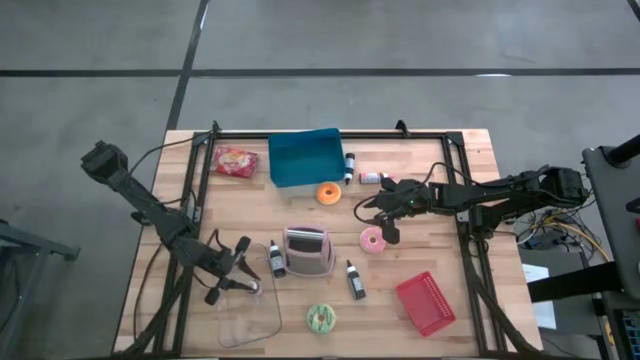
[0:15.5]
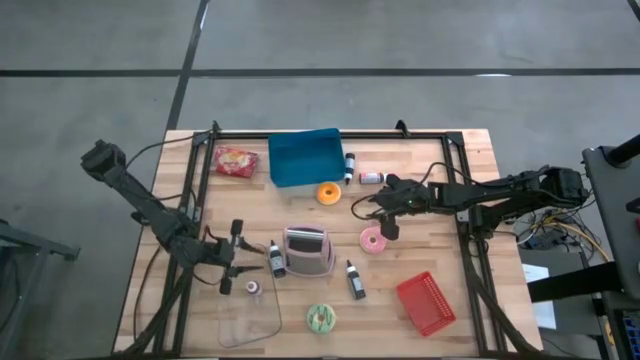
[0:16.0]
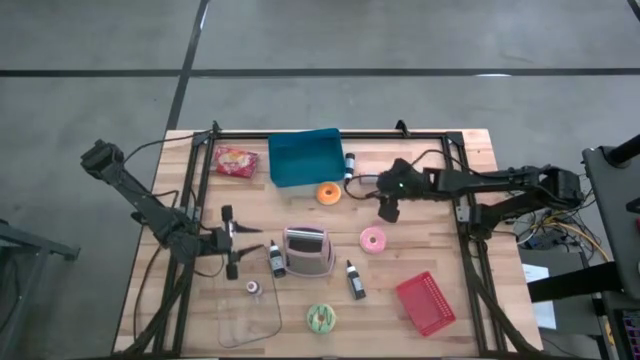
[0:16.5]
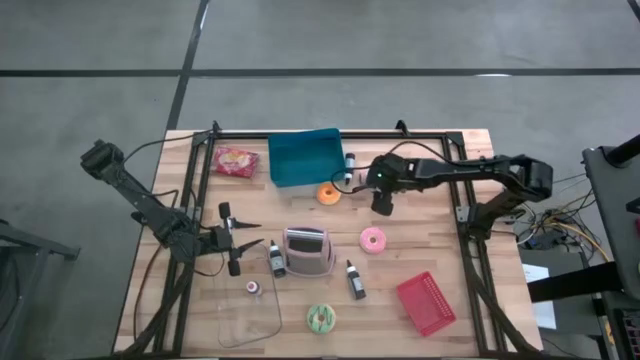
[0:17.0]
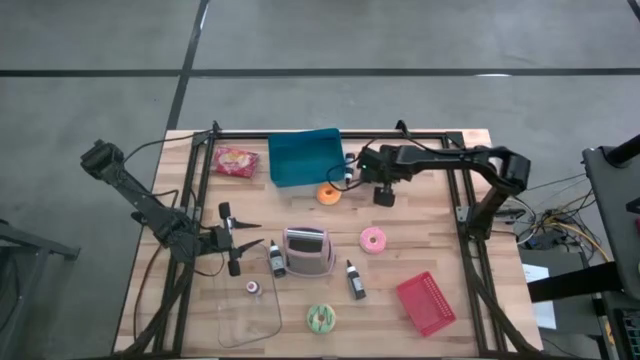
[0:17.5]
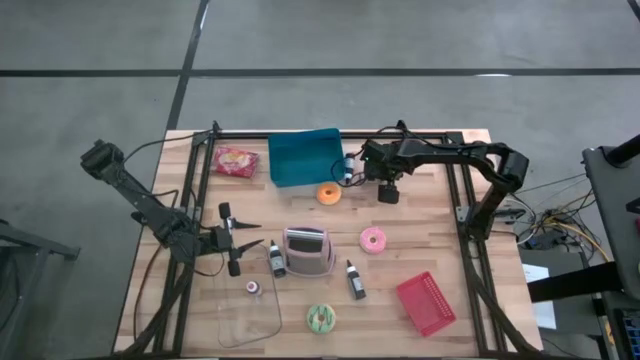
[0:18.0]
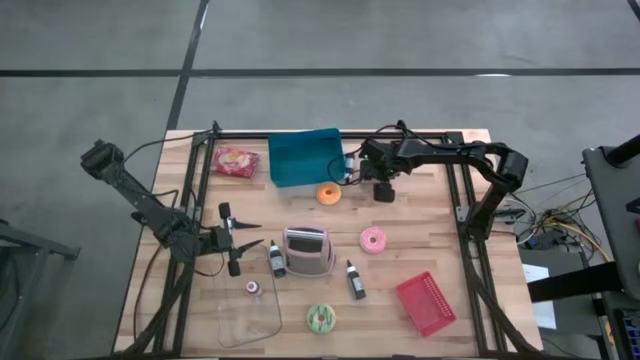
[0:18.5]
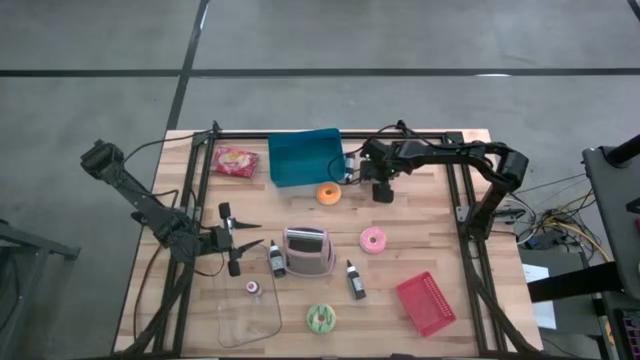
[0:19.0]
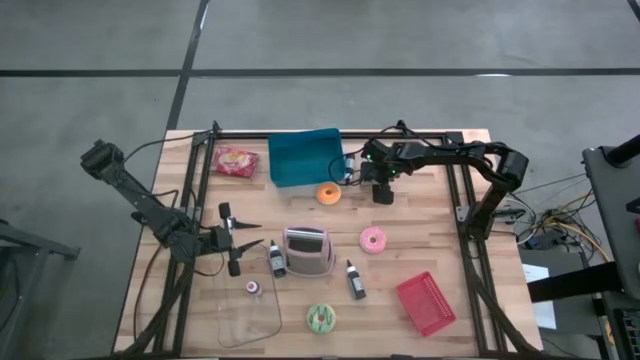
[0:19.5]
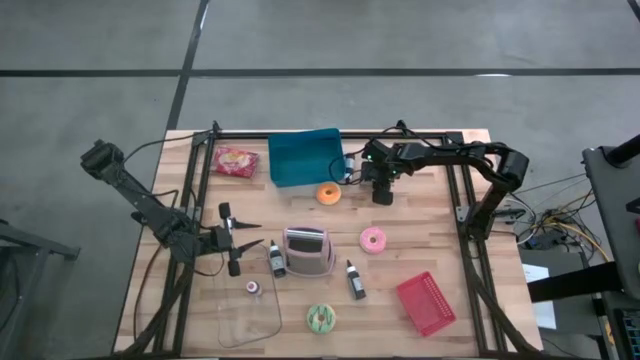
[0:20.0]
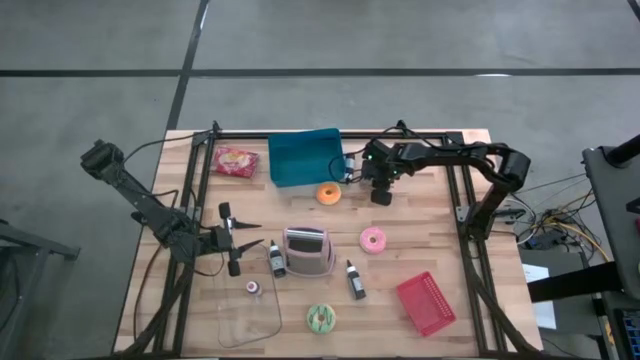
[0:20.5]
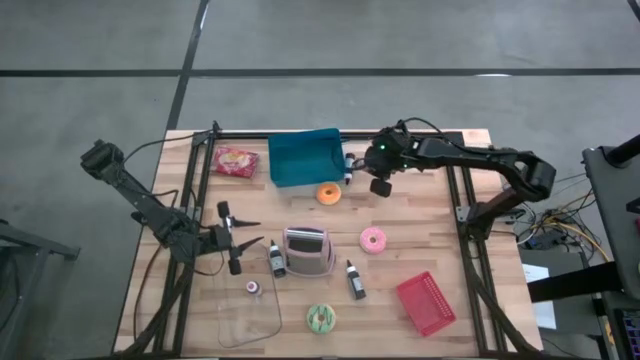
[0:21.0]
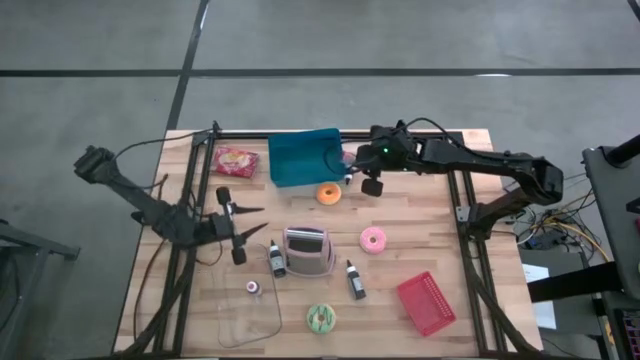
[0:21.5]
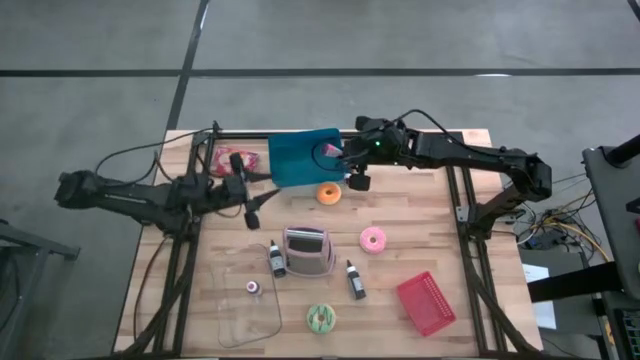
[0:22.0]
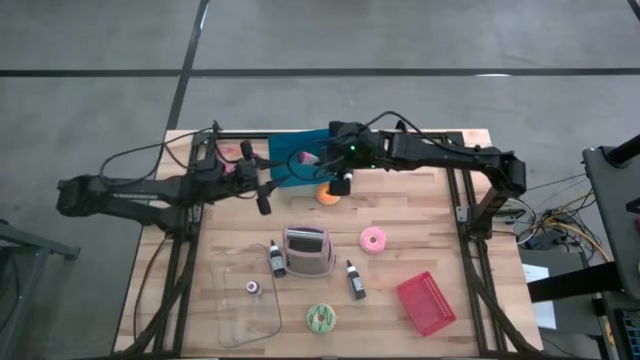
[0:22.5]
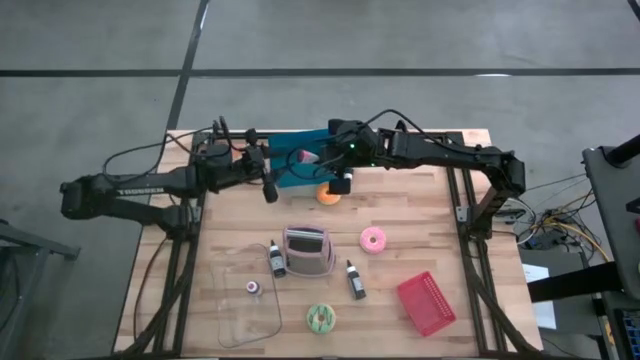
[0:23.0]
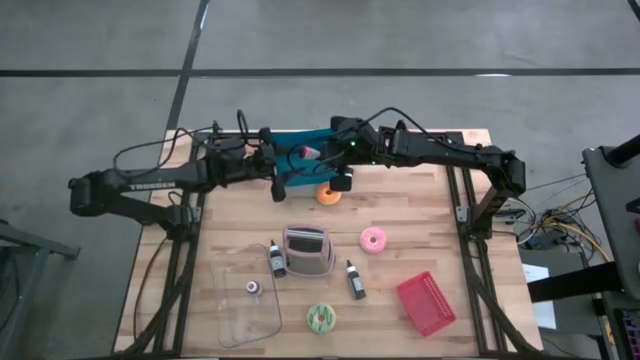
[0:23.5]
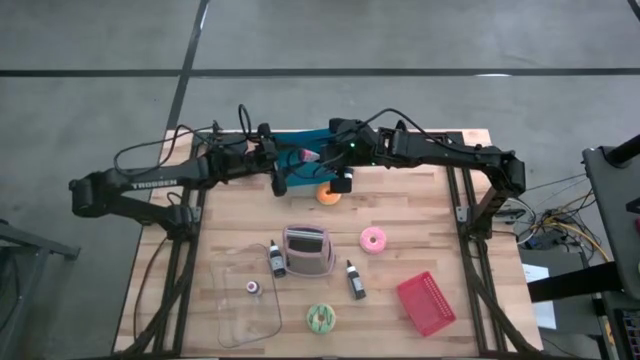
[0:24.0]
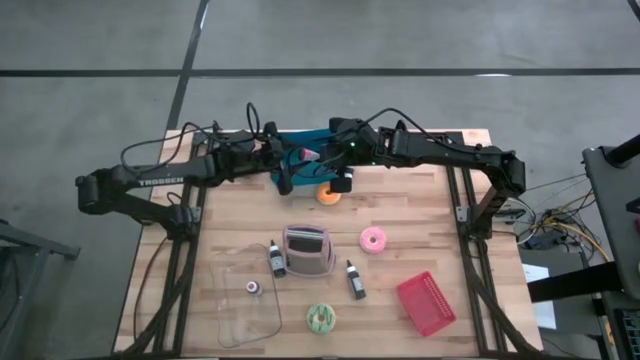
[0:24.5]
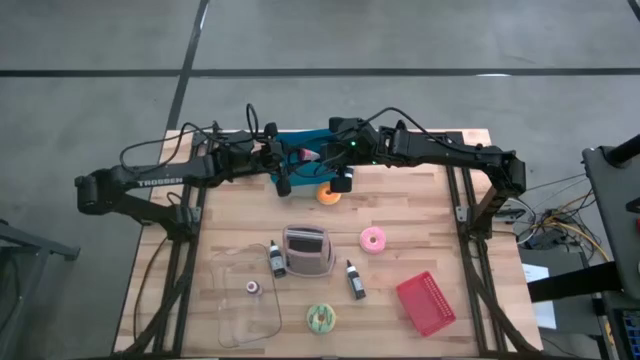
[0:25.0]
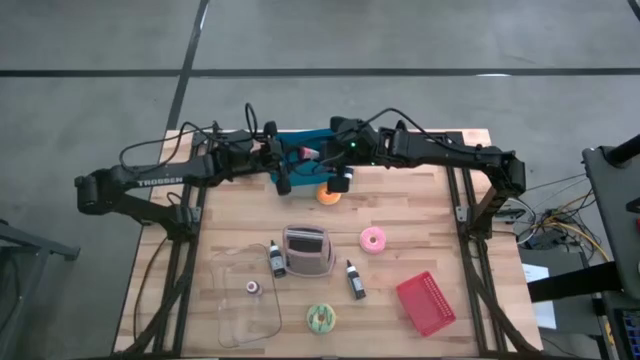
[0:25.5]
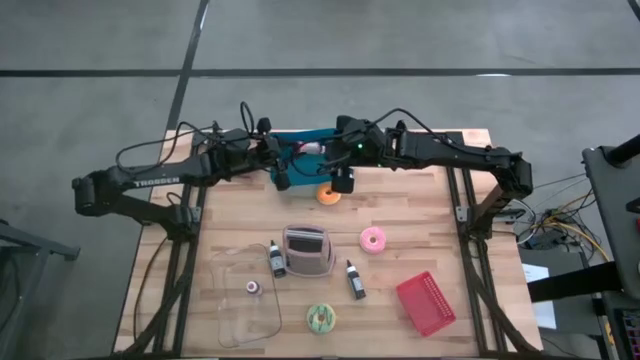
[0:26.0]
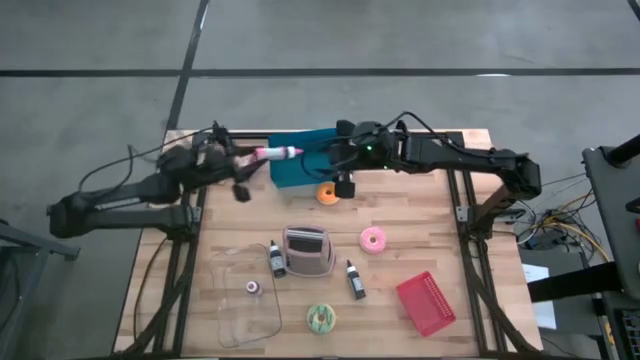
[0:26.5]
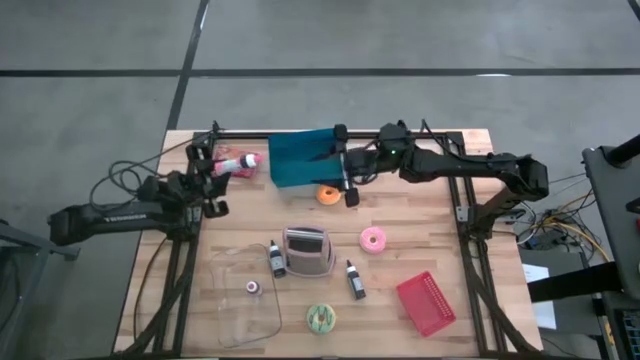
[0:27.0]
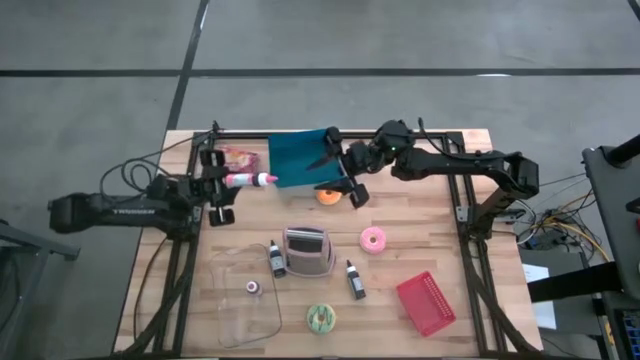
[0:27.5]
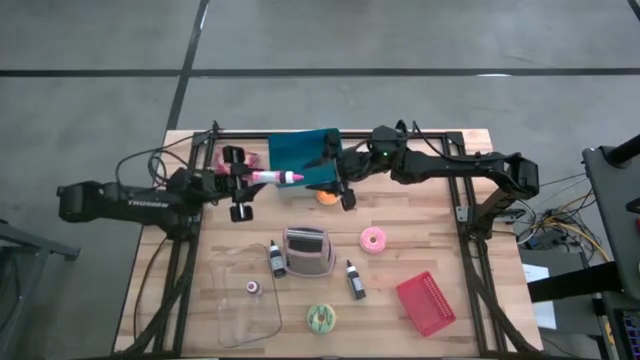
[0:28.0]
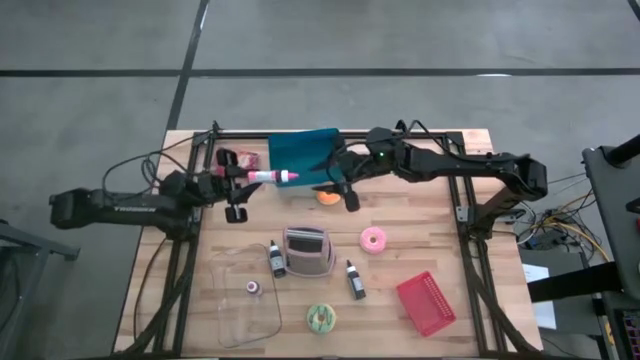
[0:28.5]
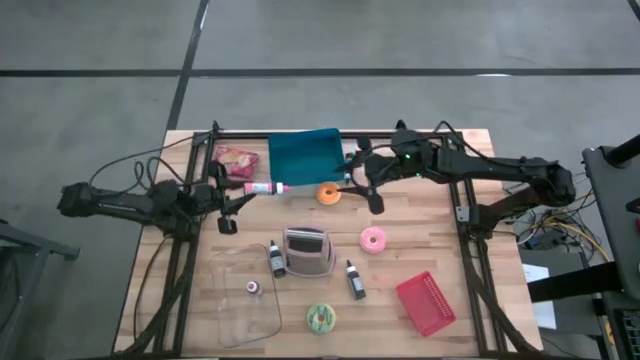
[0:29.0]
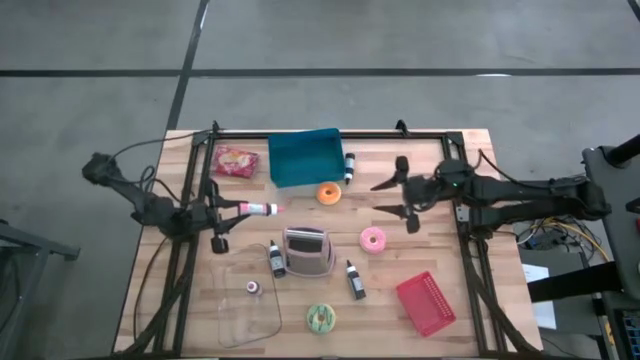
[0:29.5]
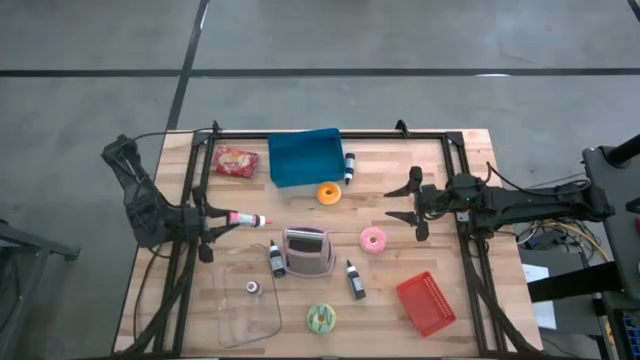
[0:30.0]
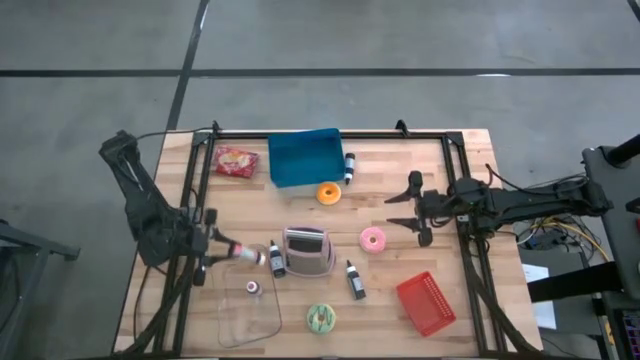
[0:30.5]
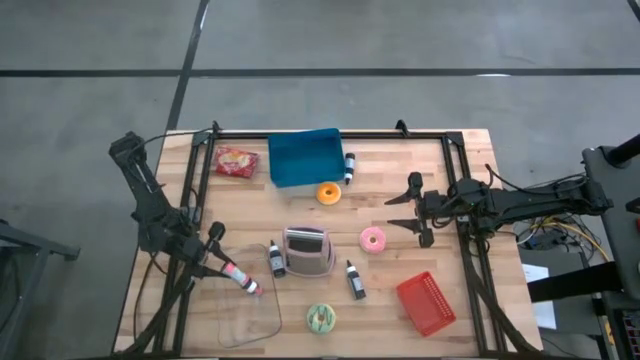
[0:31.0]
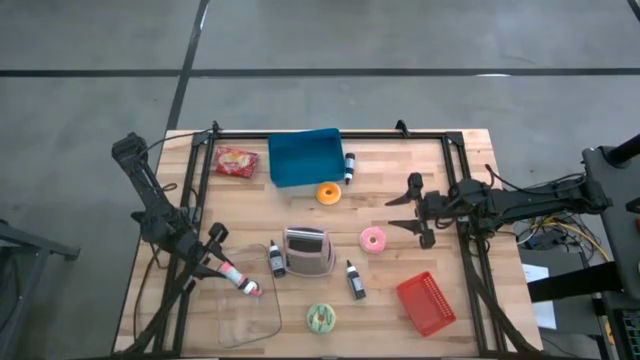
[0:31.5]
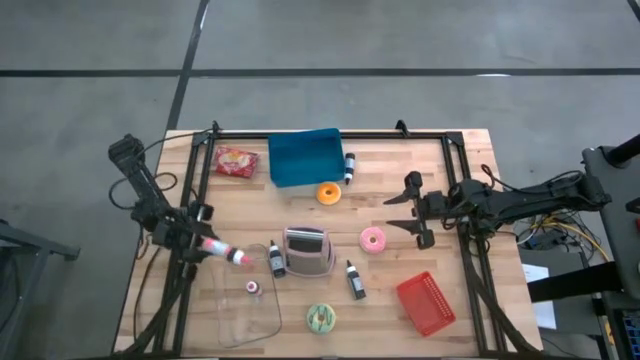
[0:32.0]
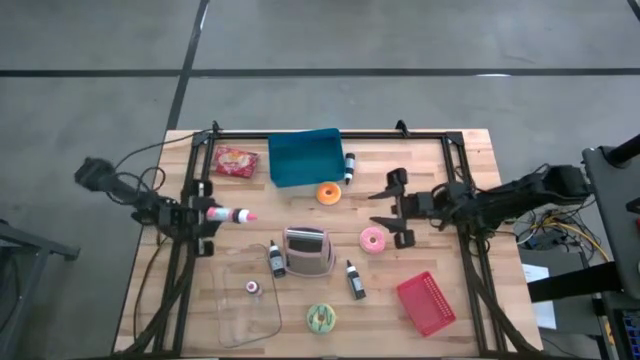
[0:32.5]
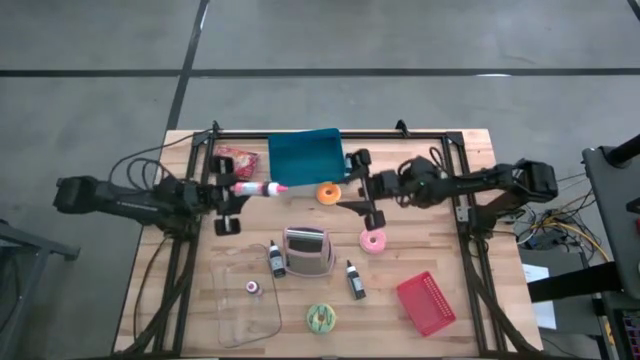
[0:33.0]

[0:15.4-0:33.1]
Task: Pick & Place Food Item
Put the pink food coloring bottle into the transparent bin

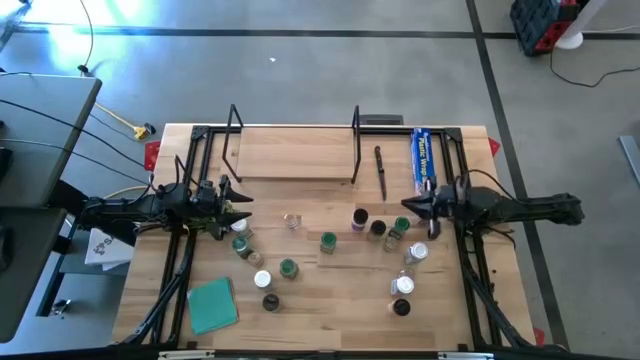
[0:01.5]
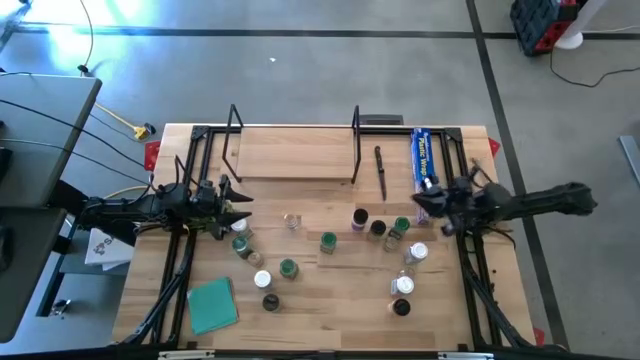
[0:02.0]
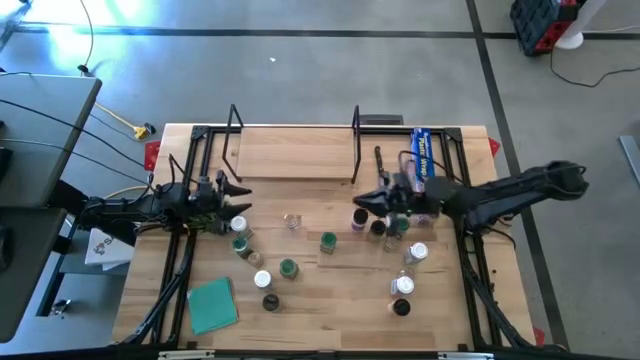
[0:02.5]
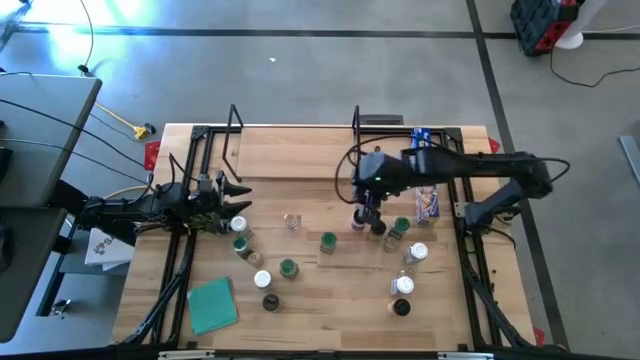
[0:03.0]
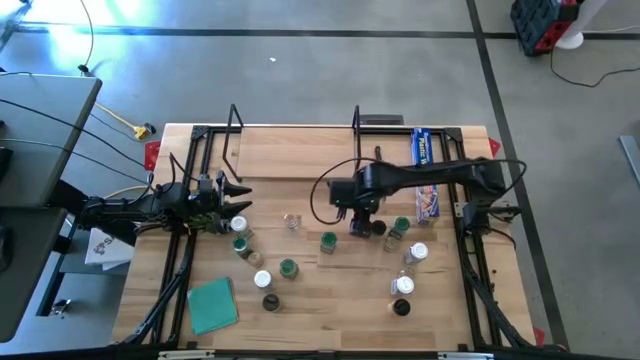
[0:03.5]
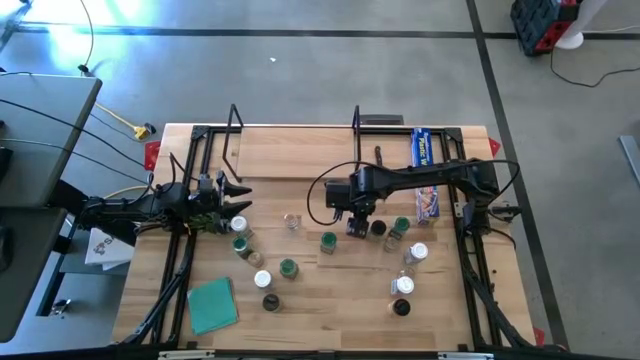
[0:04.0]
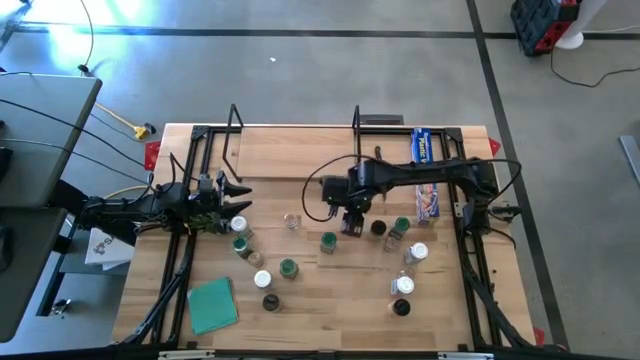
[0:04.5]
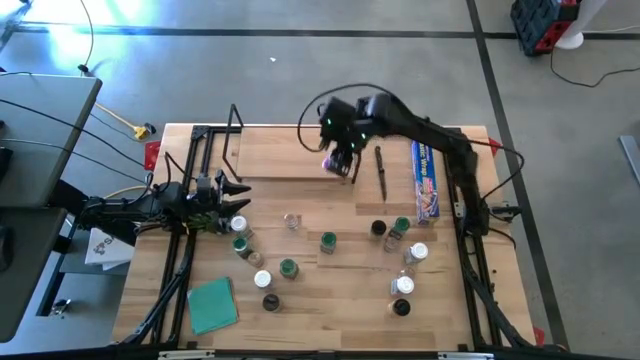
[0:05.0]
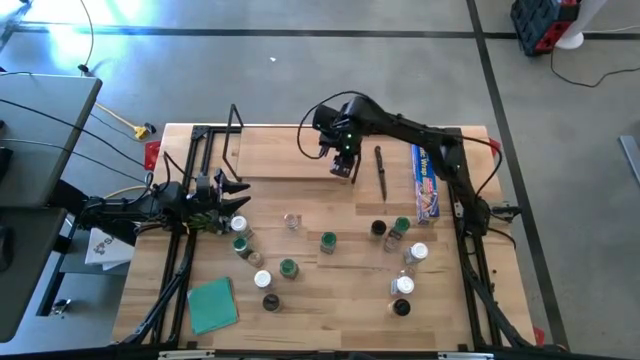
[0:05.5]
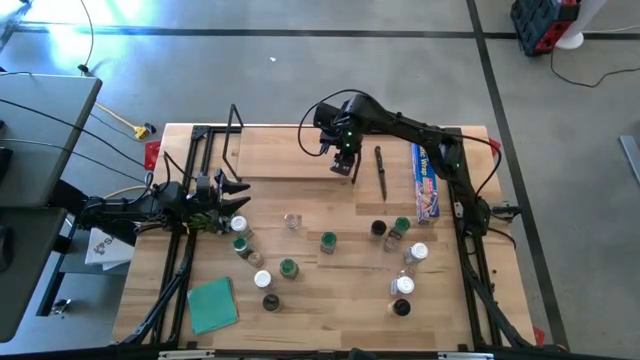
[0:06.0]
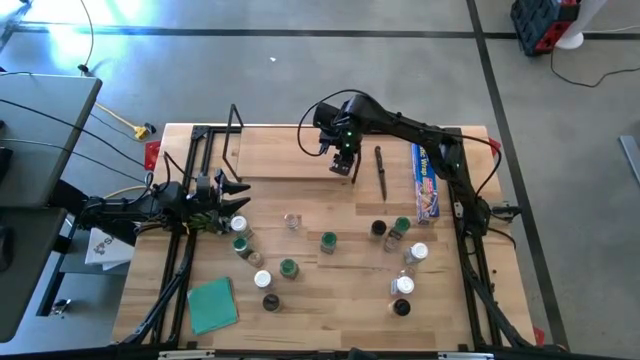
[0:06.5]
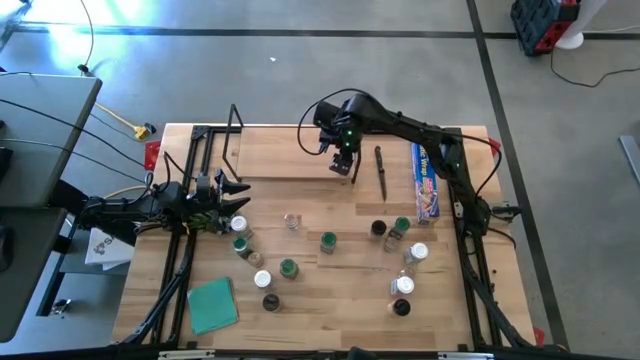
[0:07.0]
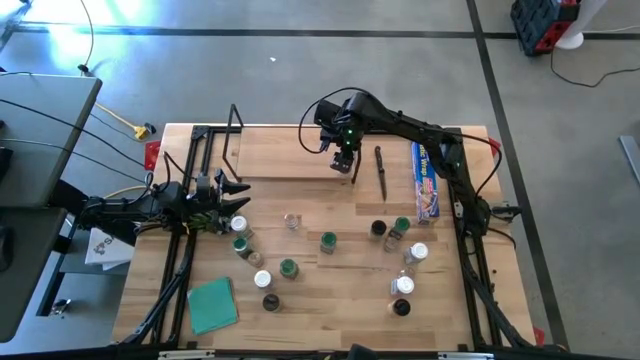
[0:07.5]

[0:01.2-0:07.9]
Task: Shelf spices
Put the black seasoning bottle on the shelf
